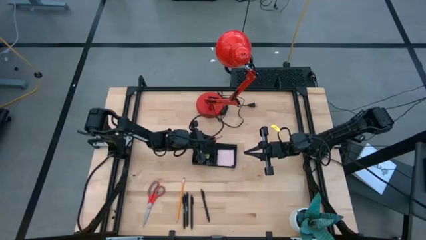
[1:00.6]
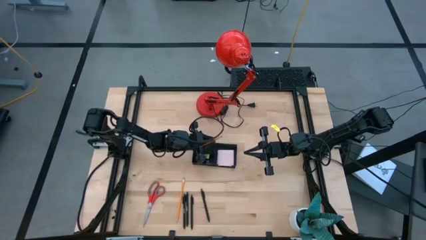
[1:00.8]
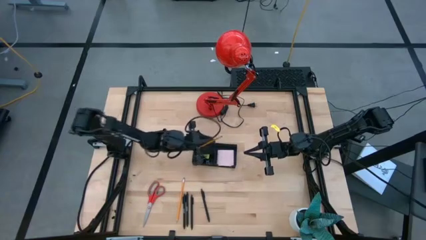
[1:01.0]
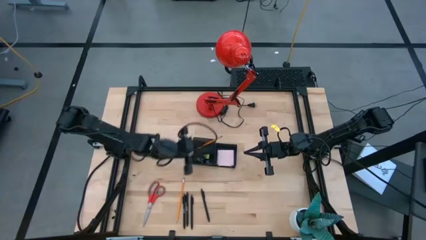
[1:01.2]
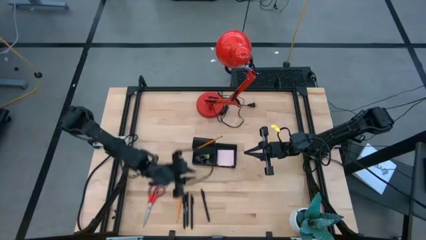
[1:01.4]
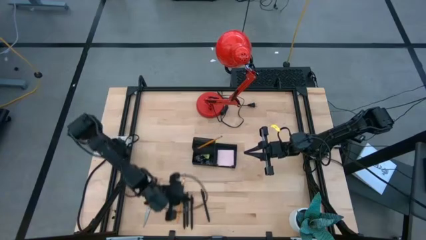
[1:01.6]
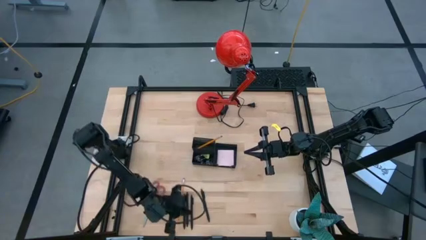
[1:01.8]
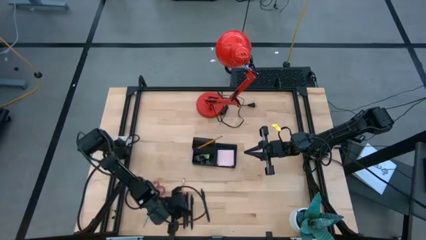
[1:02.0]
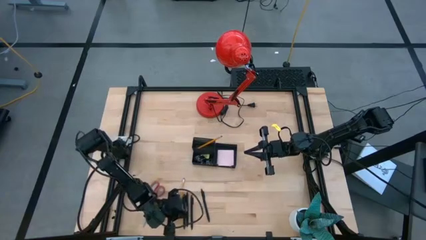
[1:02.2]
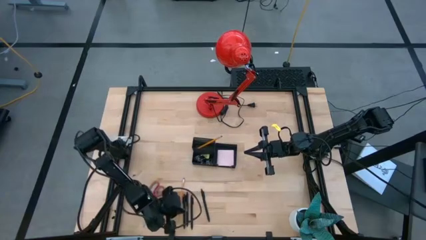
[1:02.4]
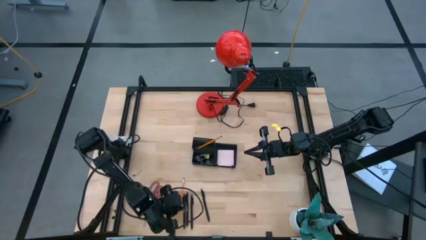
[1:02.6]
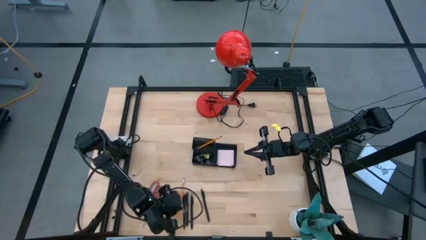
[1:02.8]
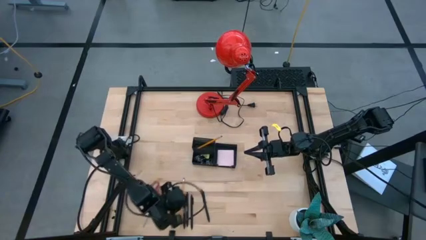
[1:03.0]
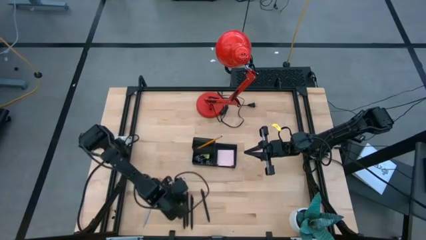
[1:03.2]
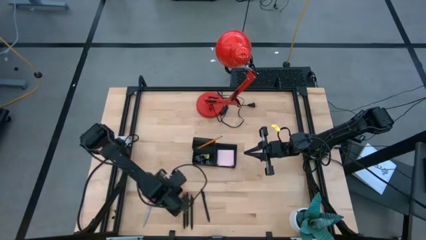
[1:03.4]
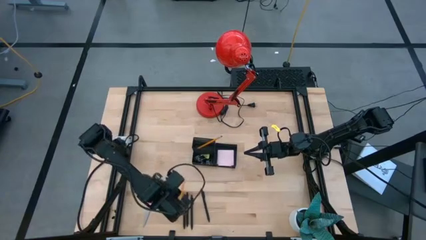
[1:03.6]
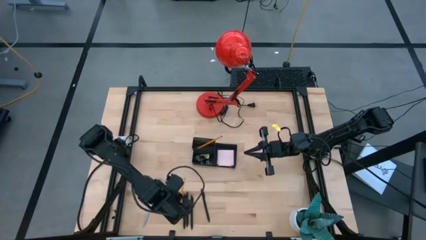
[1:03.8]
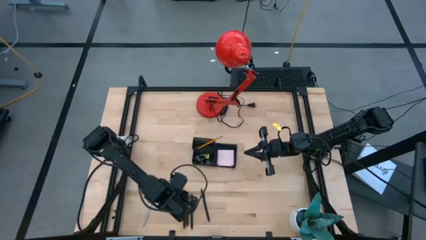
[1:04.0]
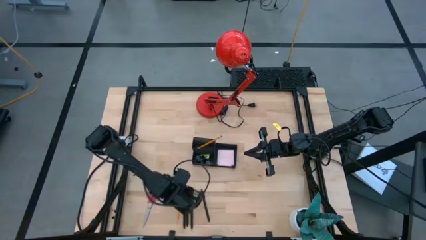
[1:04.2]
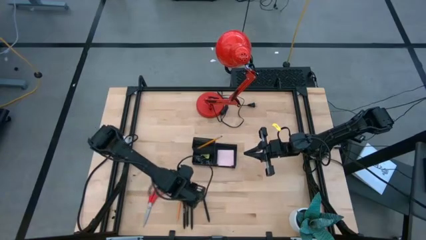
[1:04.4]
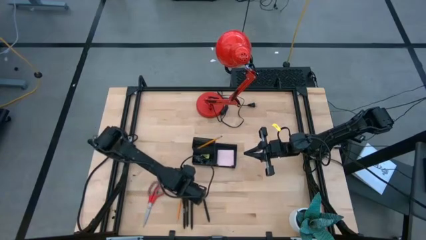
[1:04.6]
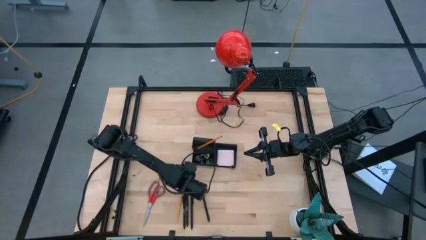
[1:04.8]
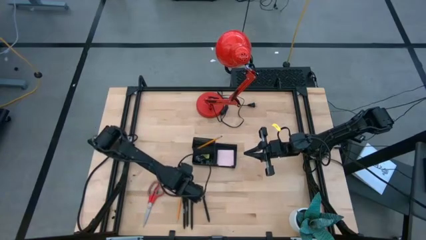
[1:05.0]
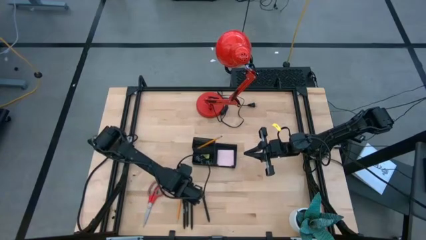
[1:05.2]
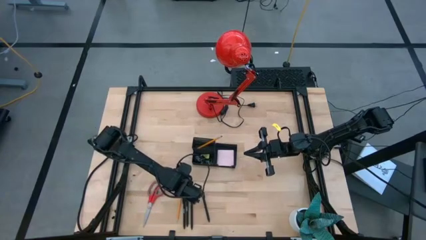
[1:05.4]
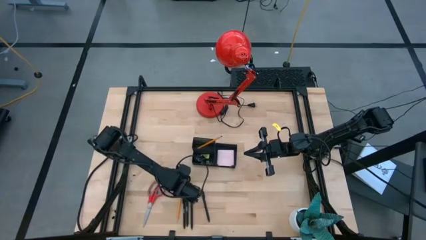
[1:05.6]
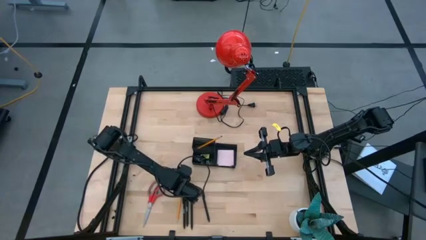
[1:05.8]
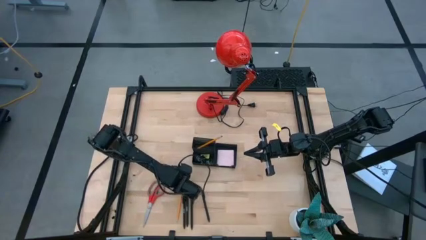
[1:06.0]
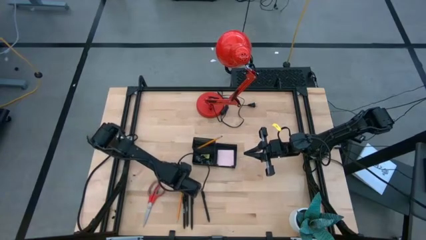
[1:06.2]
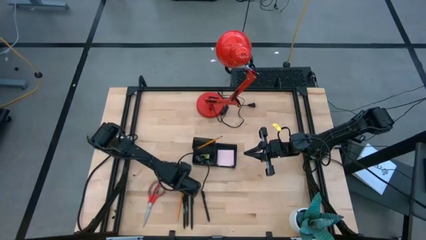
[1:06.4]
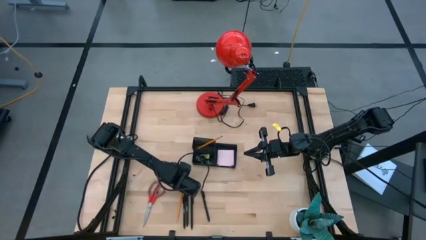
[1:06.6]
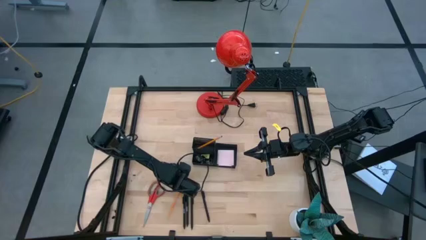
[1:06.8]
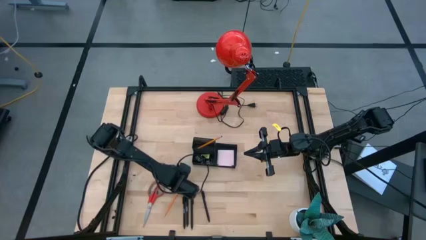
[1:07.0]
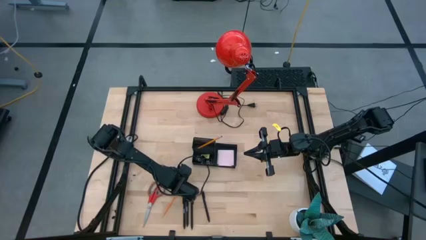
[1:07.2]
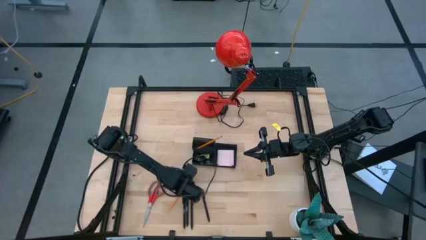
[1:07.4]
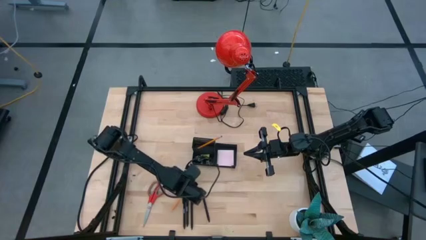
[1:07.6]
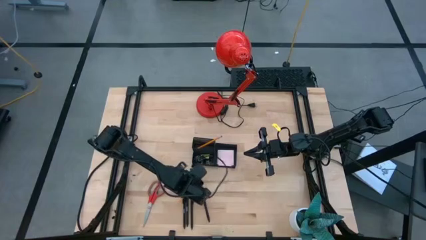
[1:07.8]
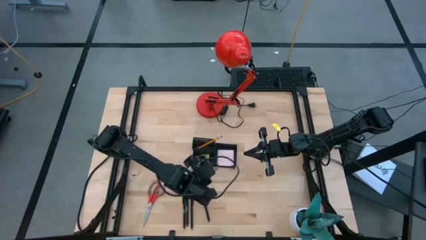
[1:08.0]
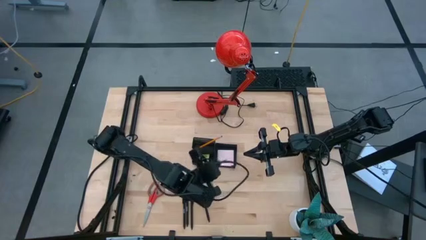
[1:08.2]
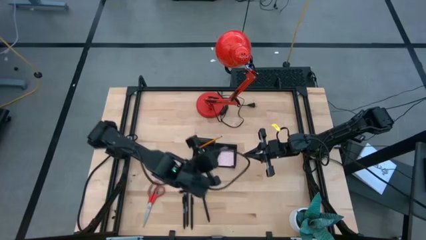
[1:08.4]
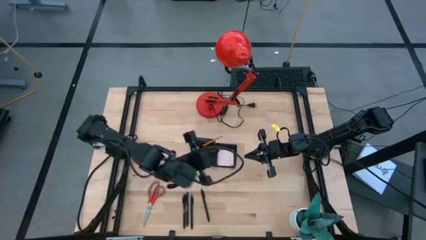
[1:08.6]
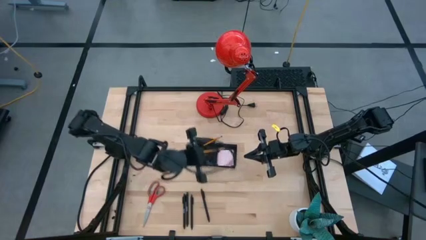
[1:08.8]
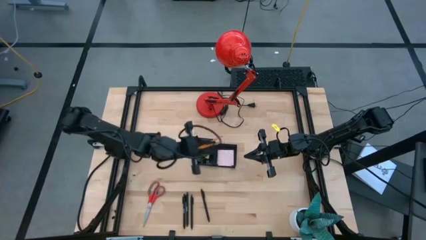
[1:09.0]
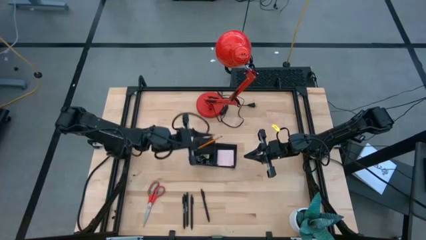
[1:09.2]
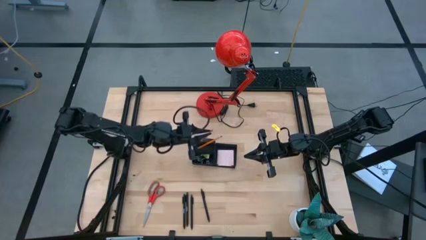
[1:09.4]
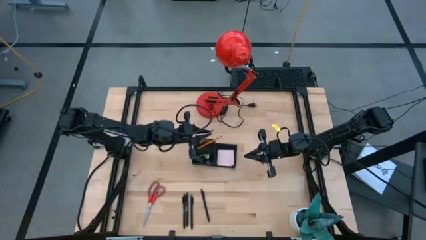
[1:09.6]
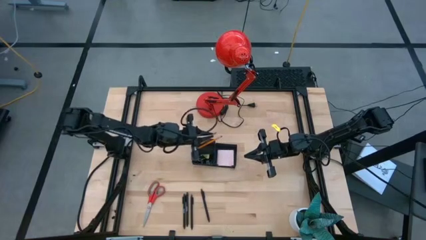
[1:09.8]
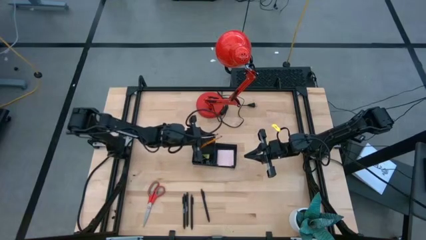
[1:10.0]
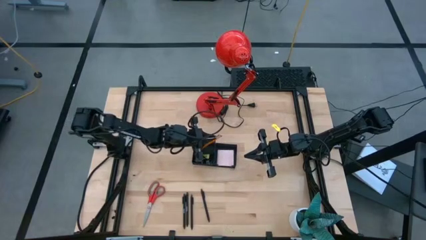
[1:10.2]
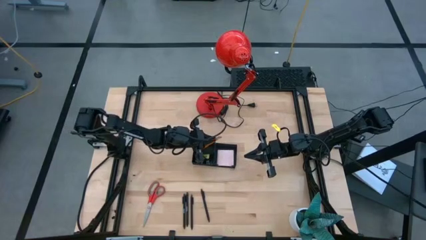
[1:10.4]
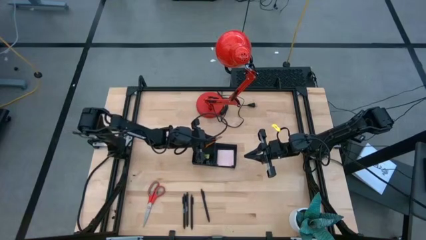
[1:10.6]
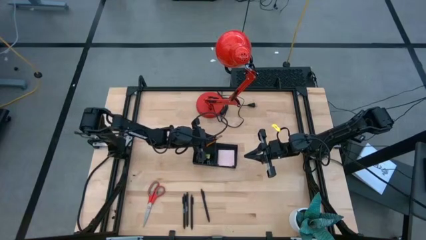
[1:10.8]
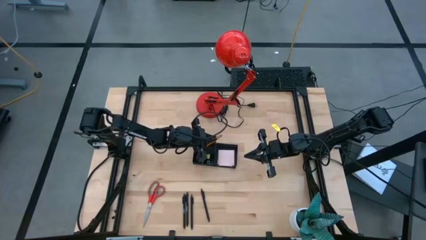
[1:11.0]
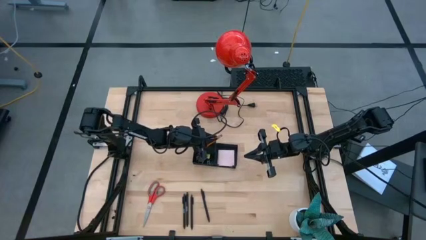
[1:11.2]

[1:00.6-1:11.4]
Task: Pick and place office supplies into organizer
Put the orange pencil into the black mesh desk organizer

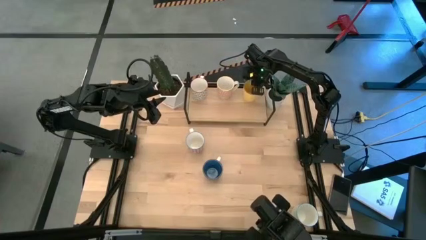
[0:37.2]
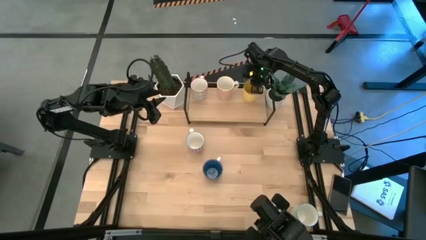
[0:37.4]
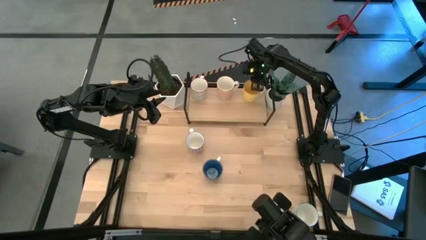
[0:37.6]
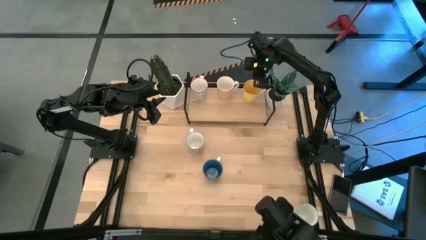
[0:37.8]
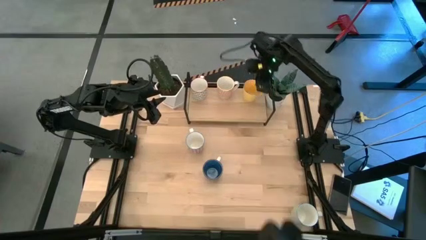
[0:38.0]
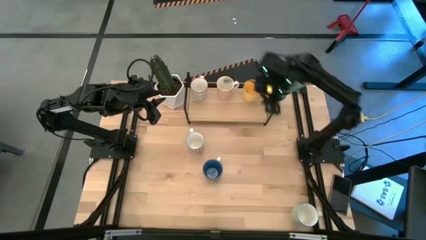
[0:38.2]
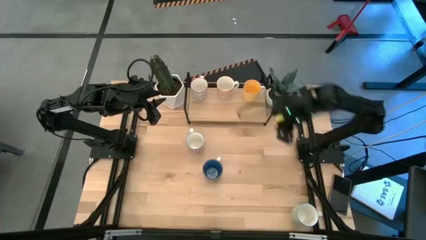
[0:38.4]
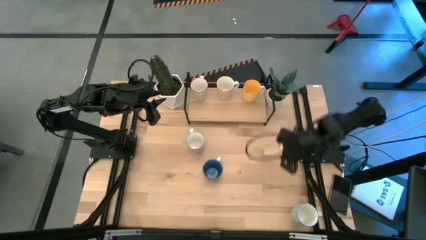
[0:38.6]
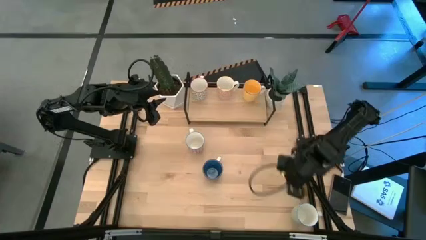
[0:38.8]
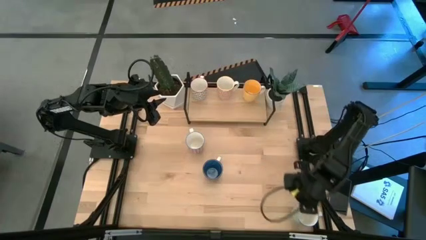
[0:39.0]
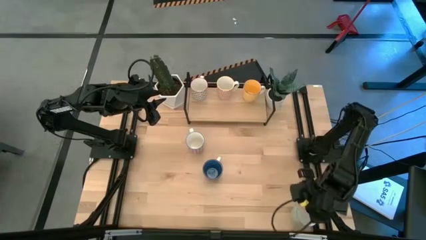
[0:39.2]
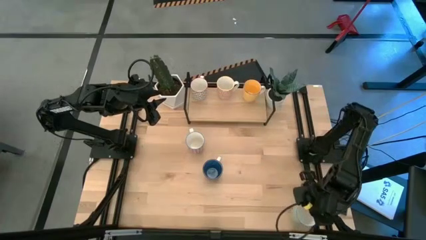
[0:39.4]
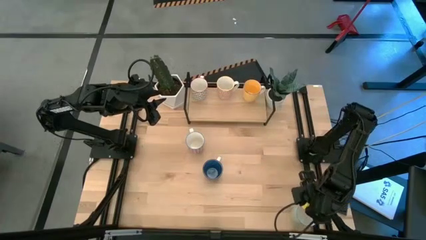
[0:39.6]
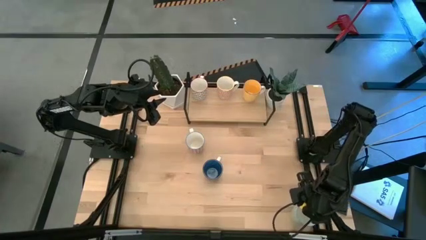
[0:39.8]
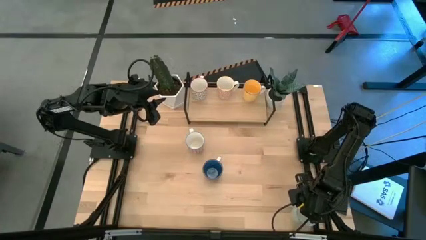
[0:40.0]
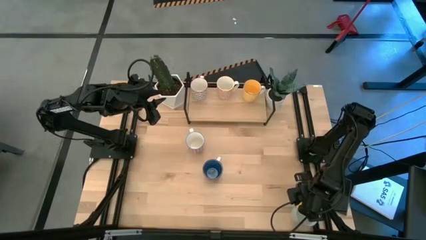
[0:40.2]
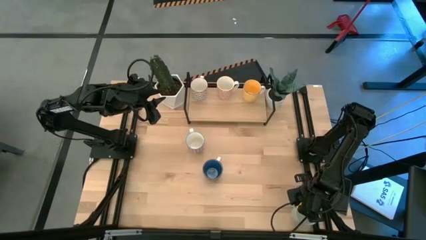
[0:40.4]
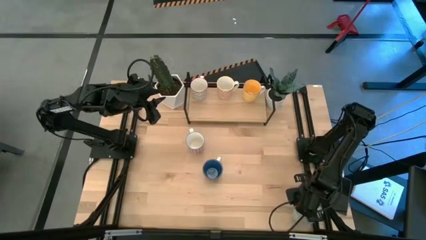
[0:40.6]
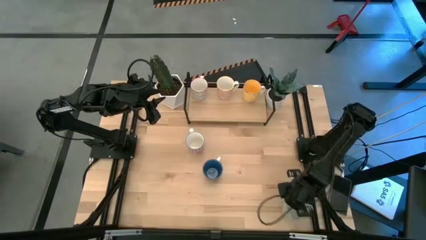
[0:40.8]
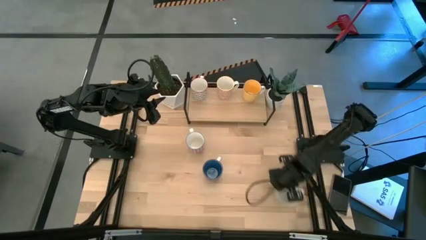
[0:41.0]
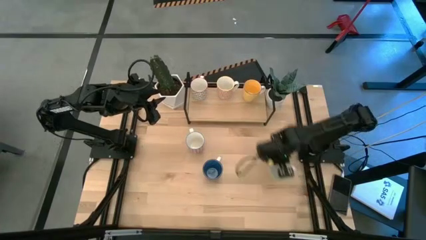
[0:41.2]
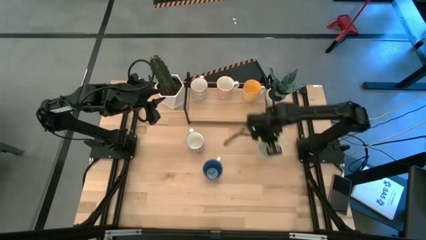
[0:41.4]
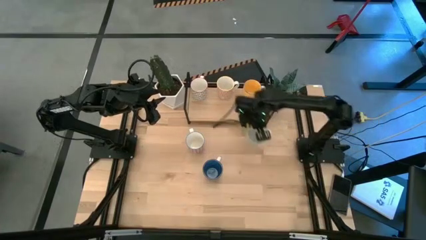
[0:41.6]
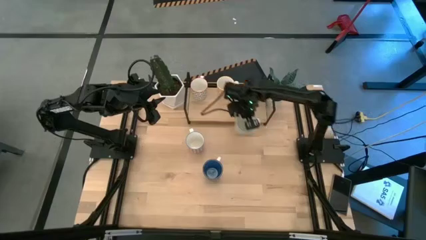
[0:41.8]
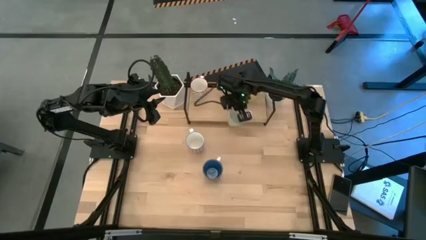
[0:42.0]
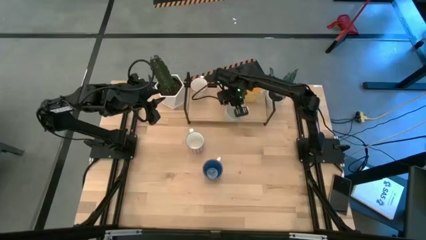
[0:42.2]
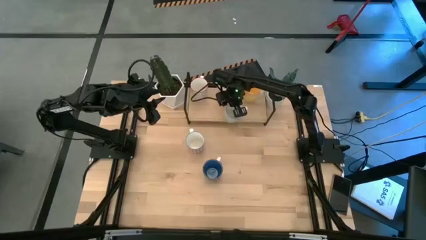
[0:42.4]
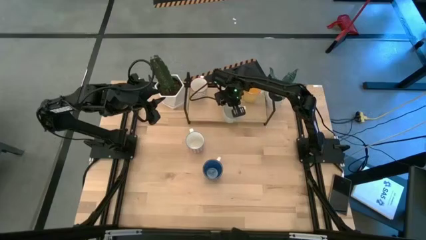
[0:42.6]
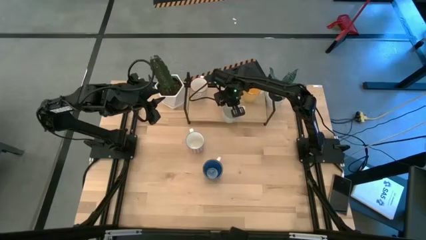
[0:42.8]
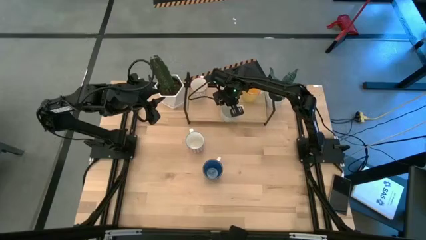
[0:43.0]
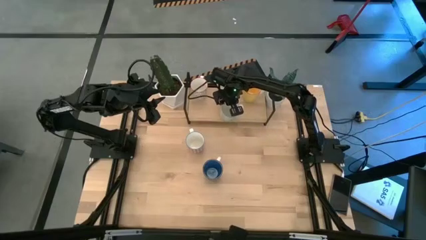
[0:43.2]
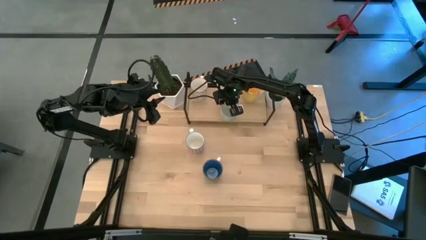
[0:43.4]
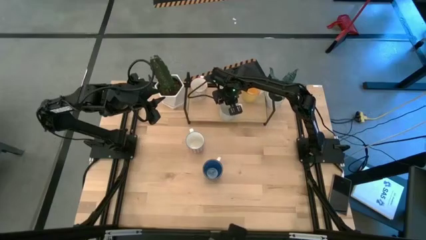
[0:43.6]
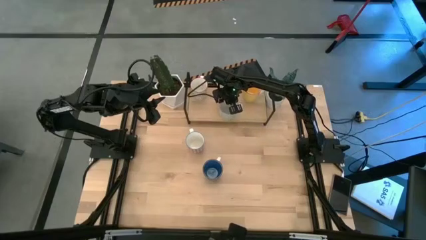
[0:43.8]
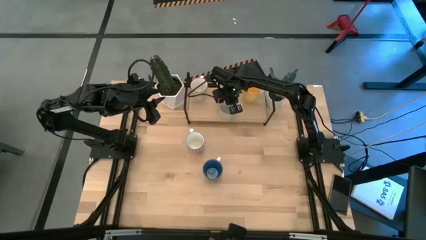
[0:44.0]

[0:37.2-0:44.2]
Task: Place coffee mugs
Put the green patterned mug on the shelf
